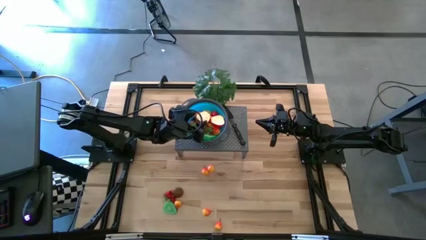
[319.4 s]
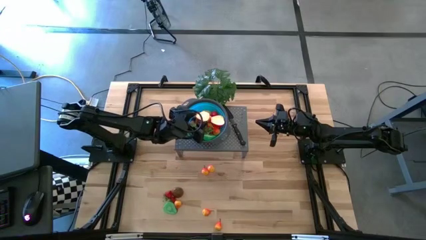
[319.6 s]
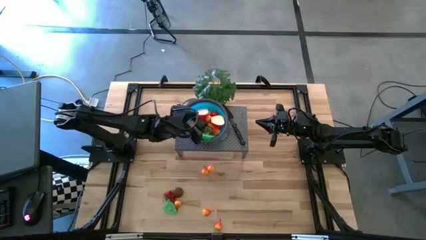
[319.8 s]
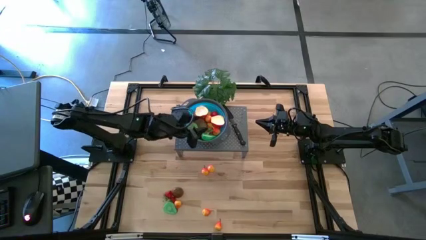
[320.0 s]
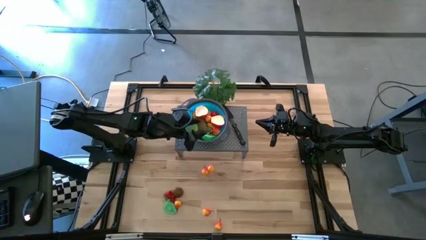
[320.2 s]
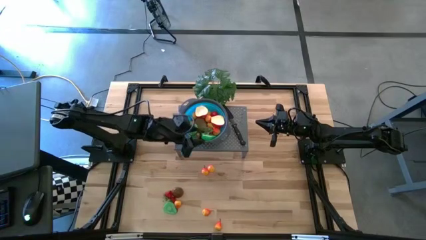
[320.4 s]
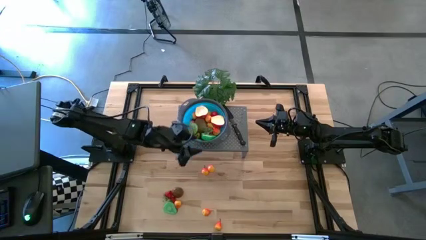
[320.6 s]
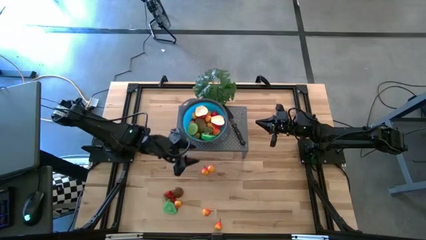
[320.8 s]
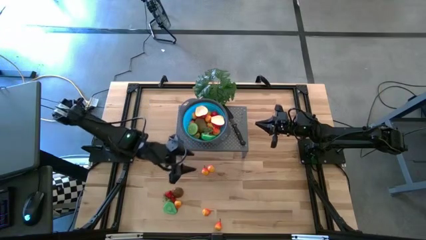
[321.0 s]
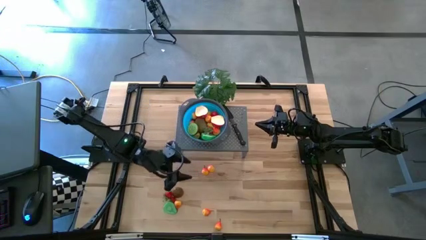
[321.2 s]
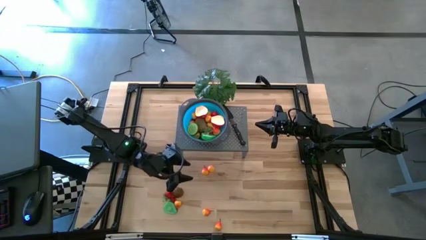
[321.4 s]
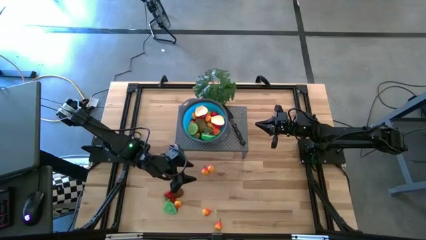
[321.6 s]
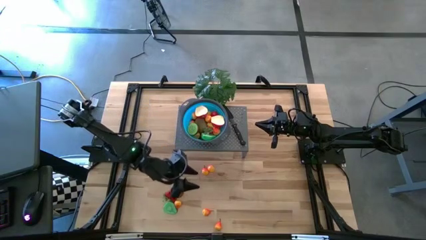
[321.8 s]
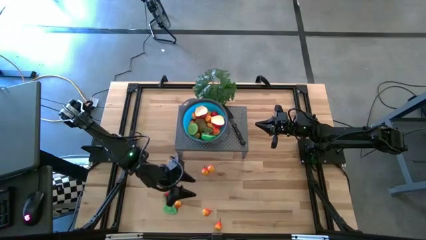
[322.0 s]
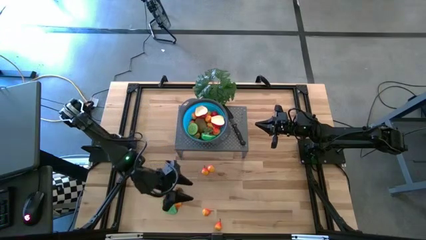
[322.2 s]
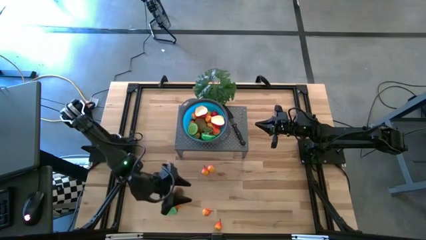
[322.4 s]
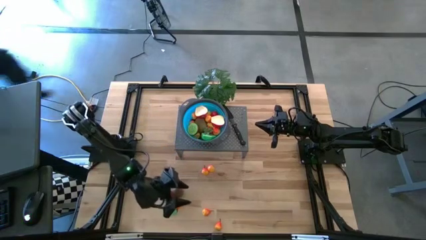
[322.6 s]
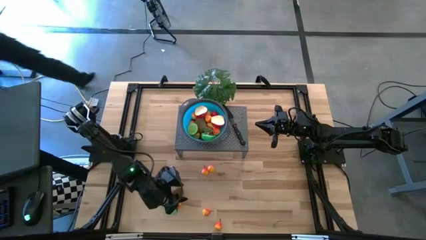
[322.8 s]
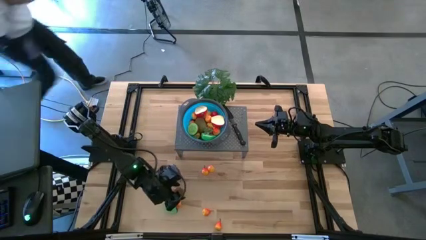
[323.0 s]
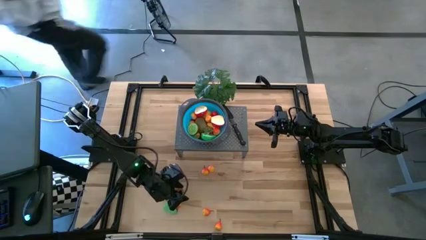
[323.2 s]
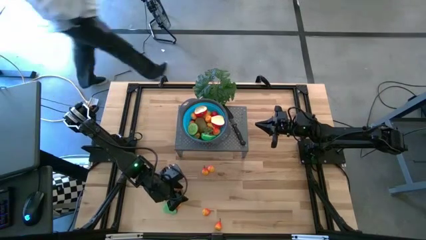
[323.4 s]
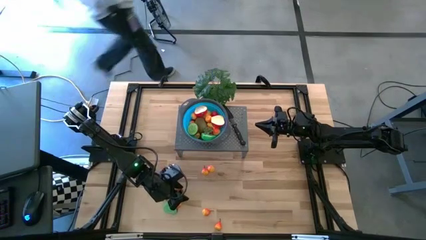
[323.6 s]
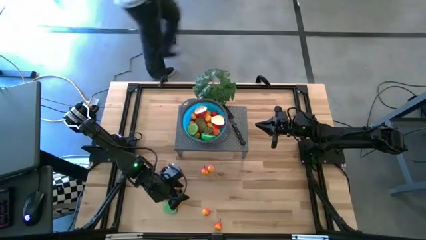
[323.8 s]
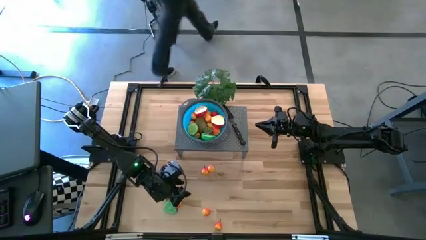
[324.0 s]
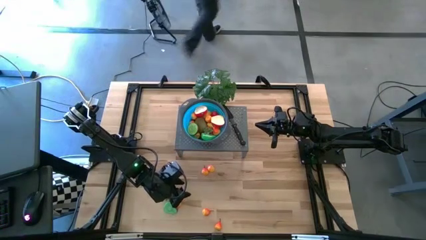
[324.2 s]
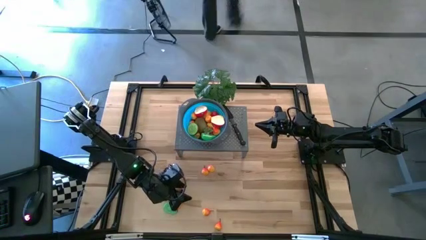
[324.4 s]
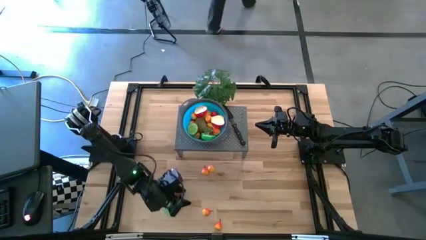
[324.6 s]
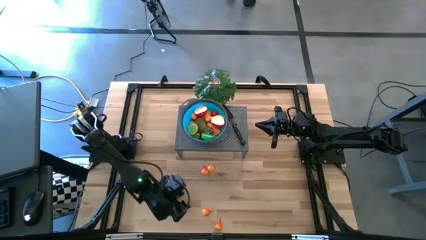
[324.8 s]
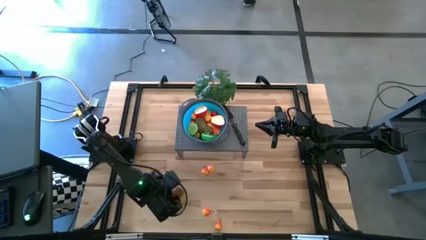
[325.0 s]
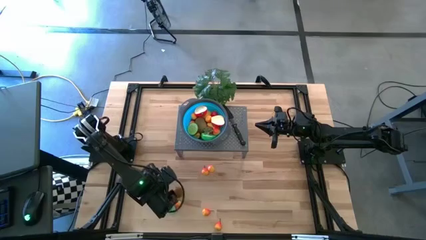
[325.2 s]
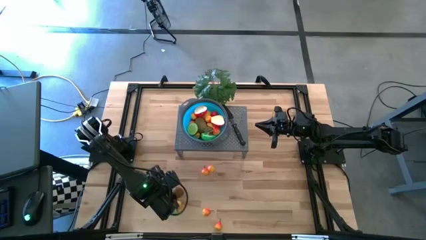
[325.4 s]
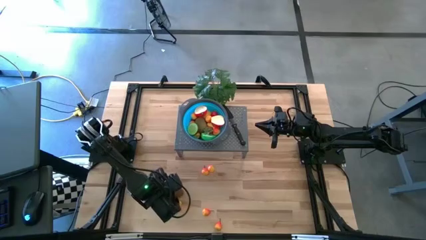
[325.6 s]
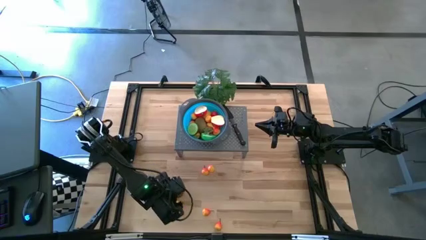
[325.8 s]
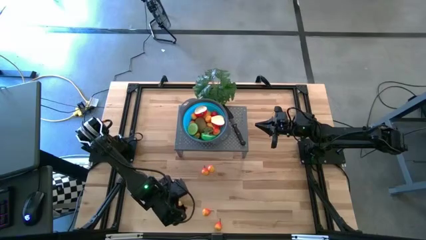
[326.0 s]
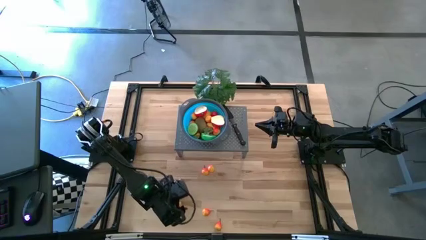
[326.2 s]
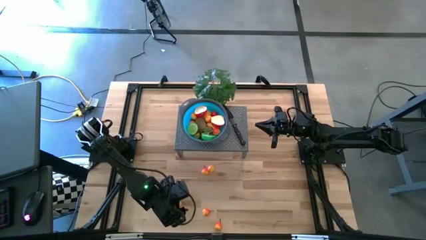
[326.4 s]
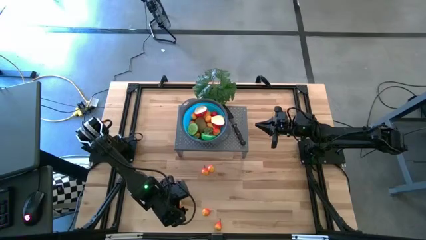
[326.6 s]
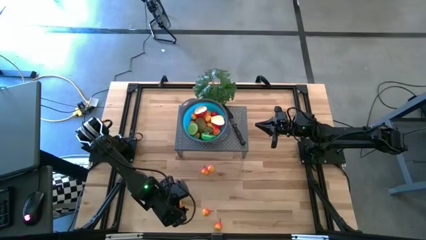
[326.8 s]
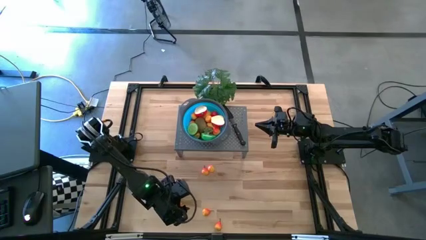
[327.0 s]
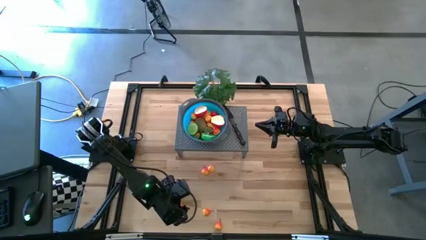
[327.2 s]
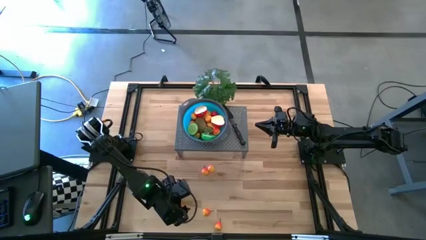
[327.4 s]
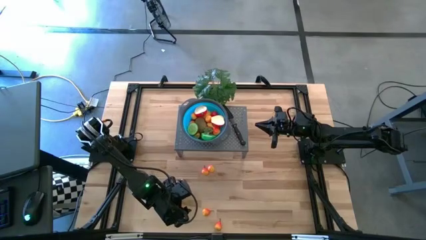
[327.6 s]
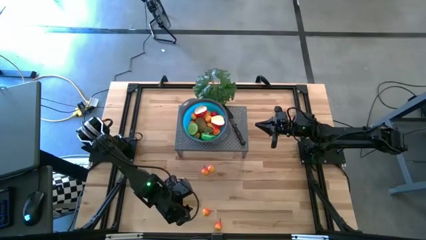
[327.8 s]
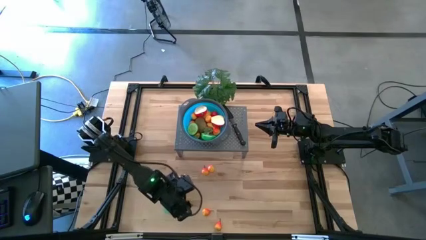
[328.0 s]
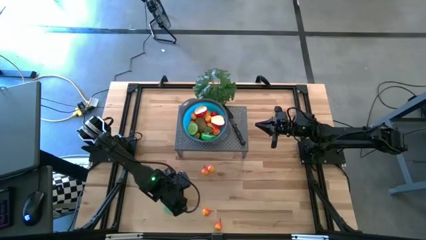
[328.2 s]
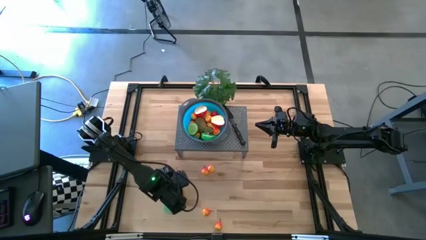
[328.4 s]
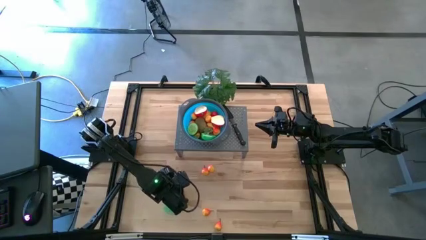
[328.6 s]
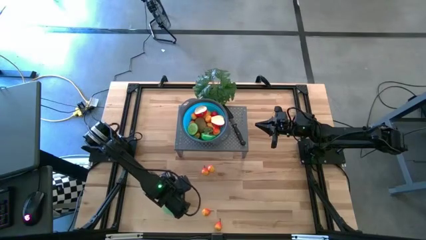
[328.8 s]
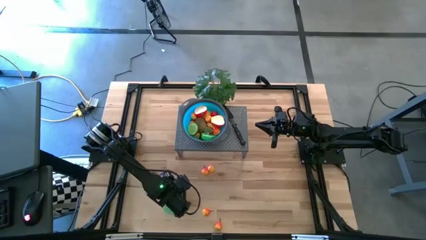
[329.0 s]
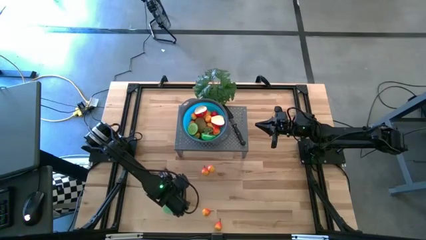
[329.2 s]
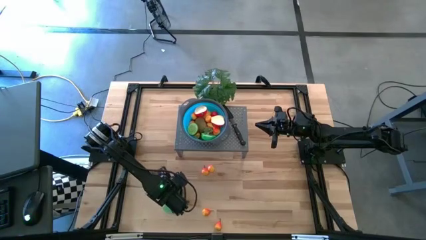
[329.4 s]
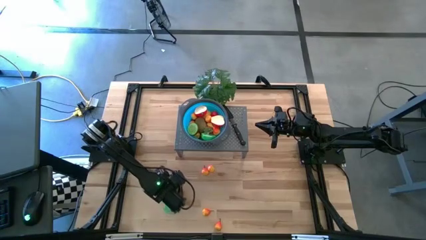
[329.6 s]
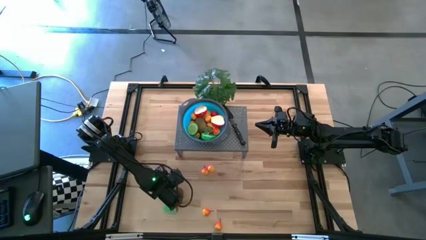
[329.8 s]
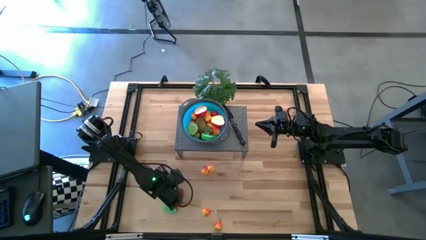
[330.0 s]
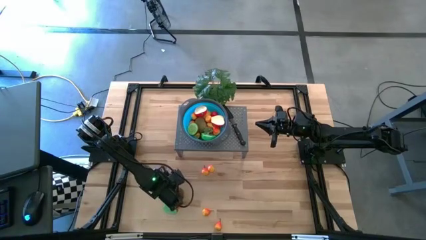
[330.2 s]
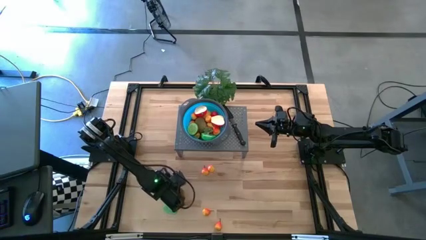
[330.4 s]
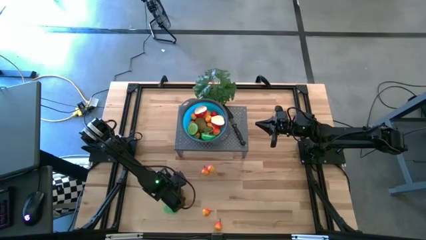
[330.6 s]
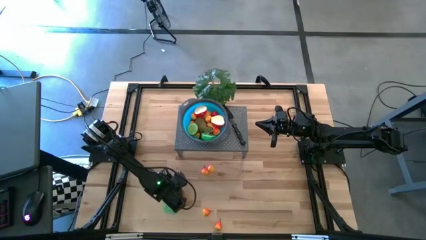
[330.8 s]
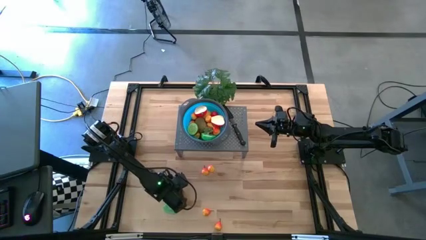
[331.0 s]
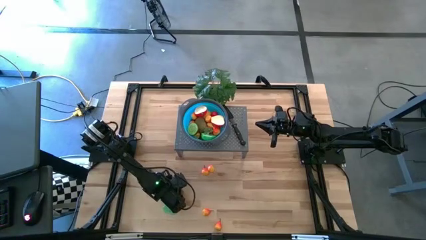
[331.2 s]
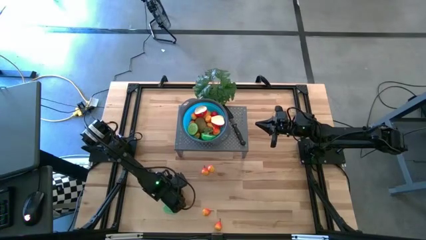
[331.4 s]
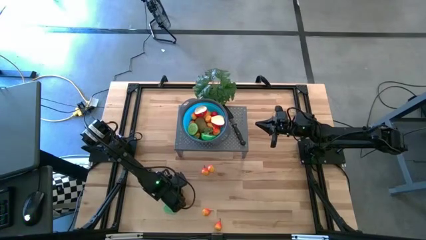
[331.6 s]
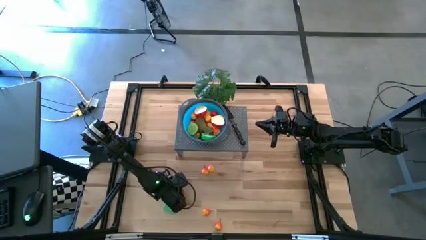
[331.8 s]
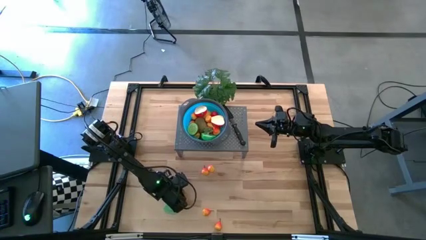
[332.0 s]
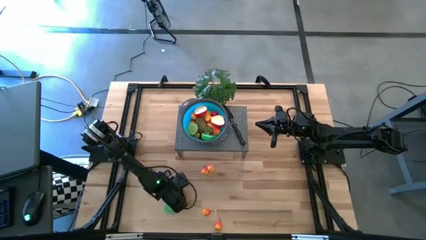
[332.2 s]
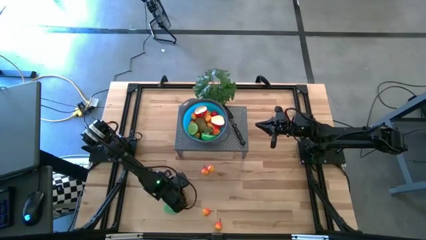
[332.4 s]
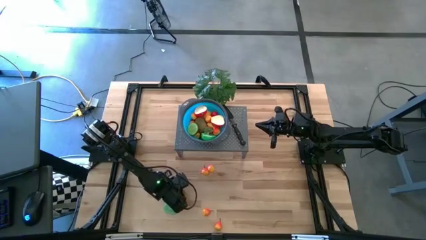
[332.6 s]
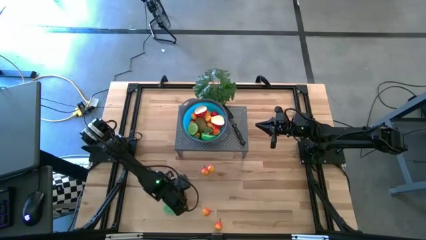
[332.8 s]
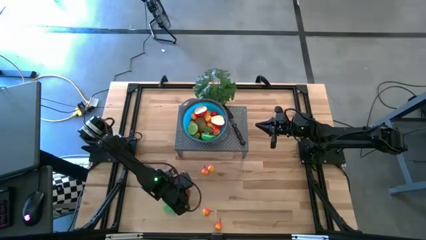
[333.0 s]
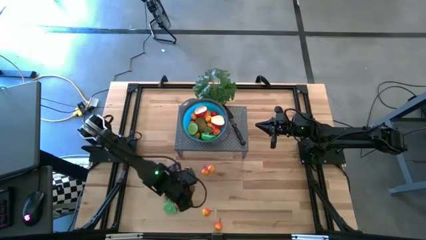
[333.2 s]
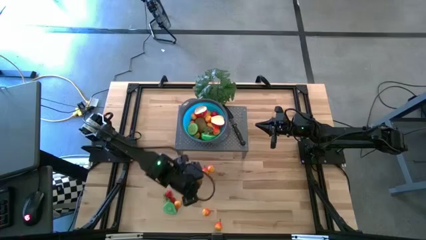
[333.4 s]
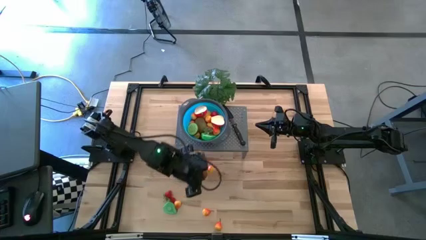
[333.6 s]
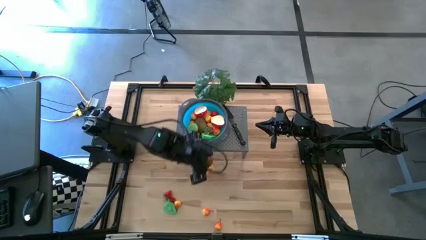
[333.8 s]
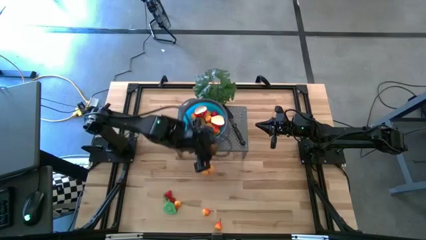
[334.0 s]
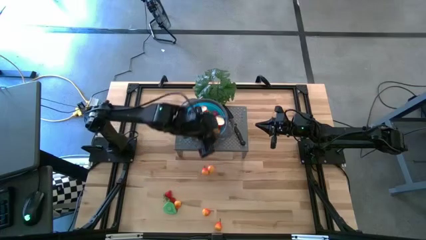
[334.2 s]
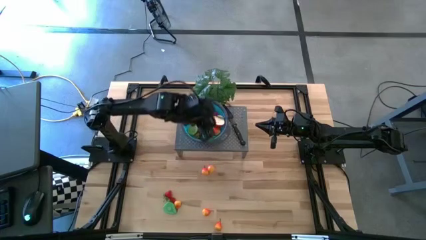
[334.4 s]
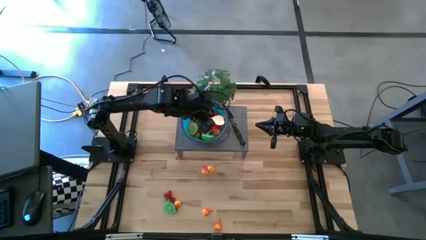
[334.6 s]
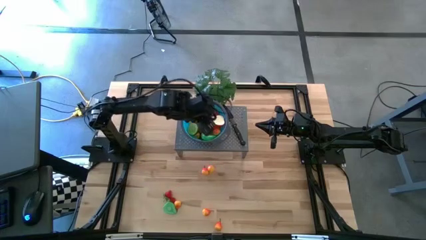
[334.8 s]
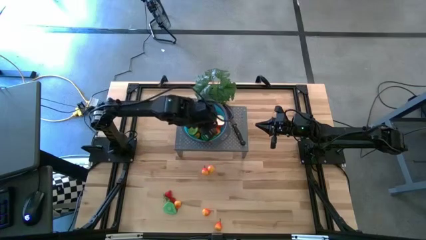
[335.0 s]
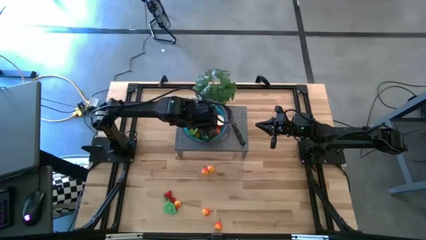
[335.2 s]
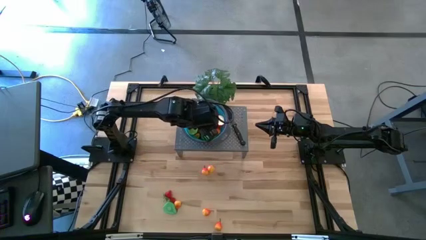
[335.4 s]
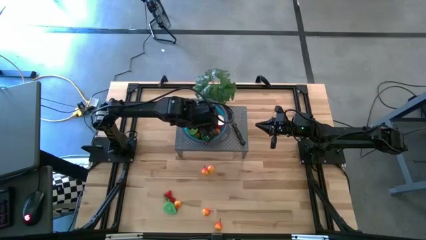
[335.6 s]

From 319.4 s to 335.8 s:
Task: Pick & Place Fruit
Put the kiwi into the blue strainer bowl on the shelf
